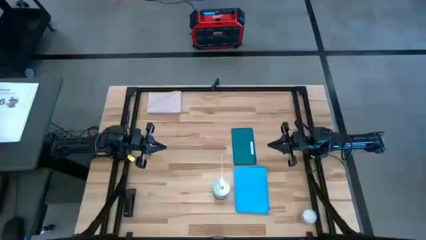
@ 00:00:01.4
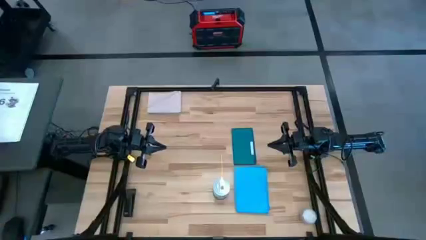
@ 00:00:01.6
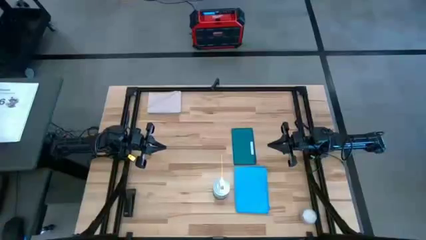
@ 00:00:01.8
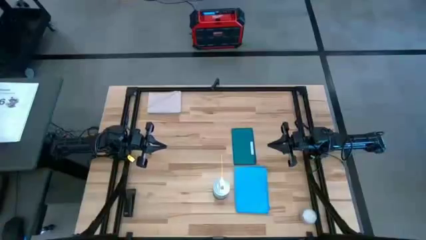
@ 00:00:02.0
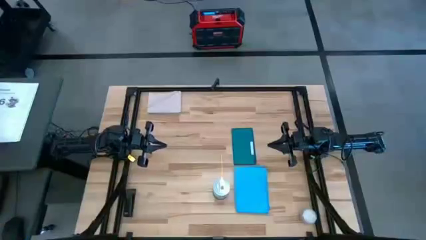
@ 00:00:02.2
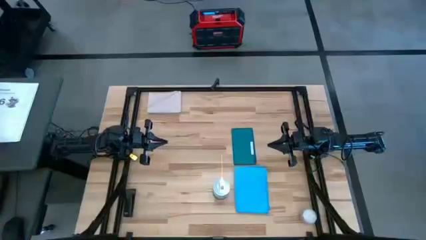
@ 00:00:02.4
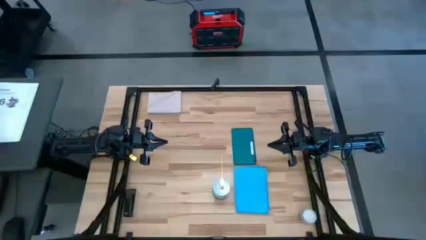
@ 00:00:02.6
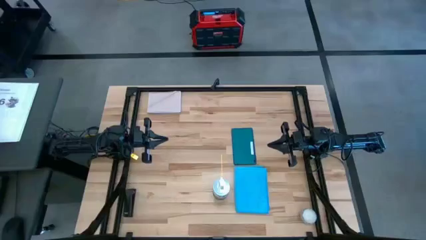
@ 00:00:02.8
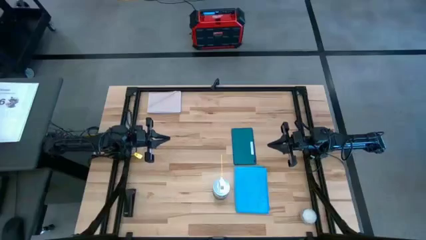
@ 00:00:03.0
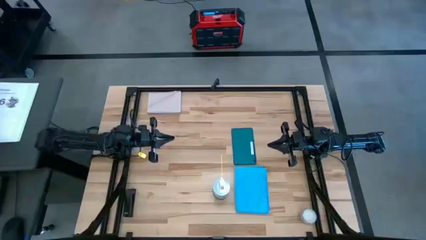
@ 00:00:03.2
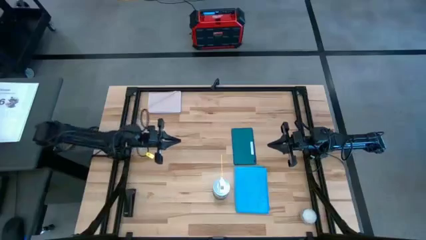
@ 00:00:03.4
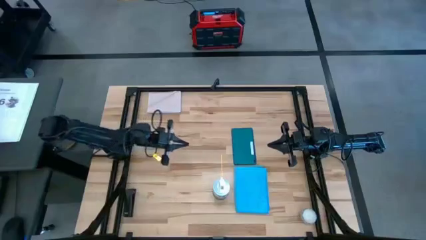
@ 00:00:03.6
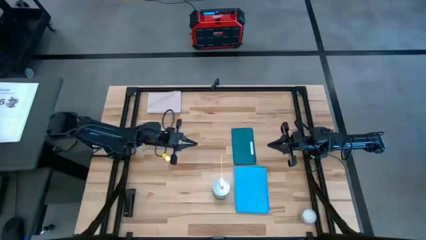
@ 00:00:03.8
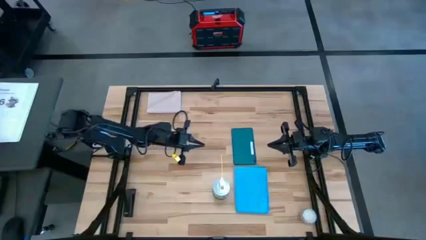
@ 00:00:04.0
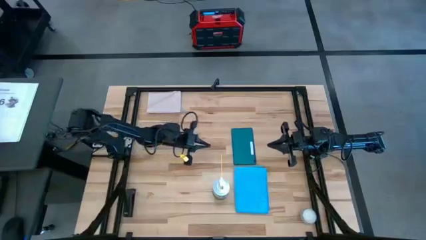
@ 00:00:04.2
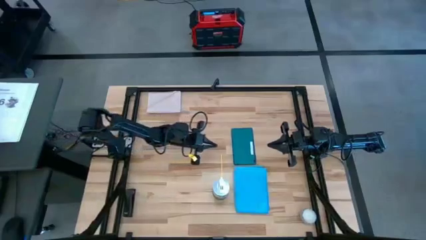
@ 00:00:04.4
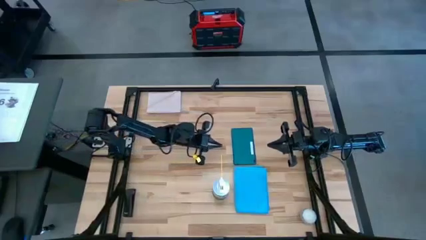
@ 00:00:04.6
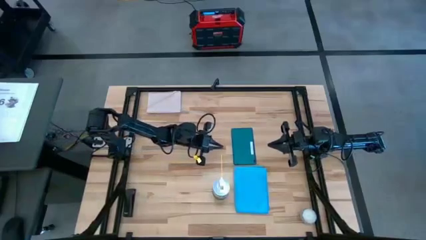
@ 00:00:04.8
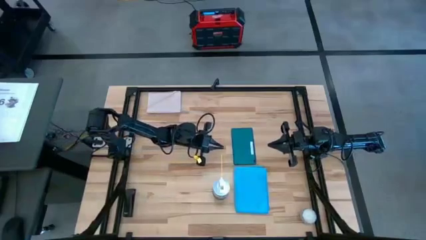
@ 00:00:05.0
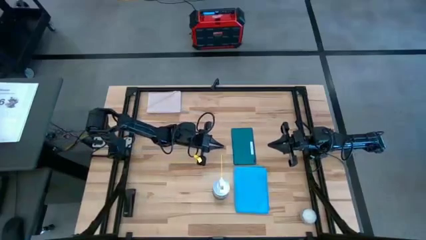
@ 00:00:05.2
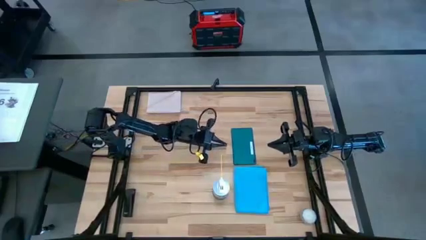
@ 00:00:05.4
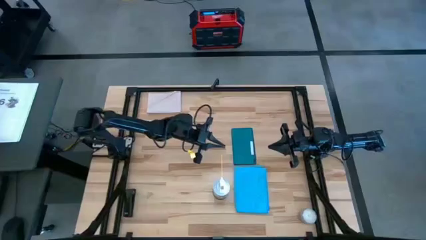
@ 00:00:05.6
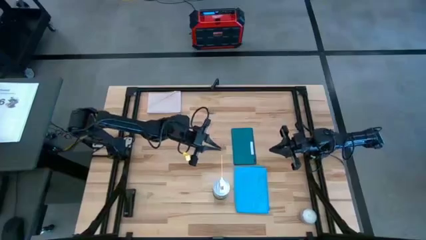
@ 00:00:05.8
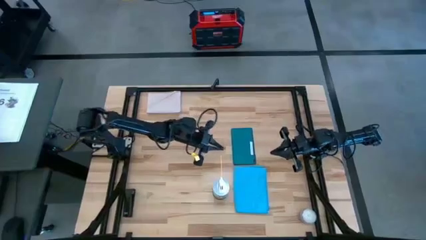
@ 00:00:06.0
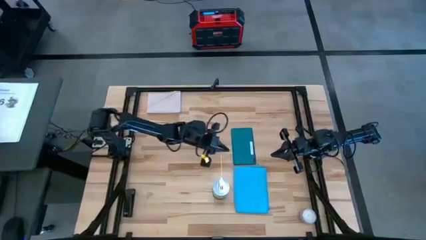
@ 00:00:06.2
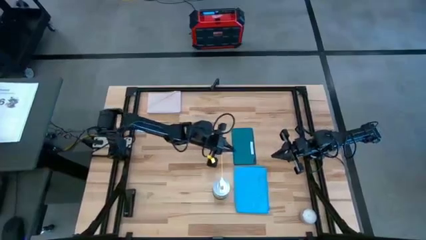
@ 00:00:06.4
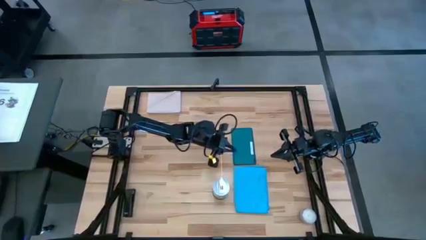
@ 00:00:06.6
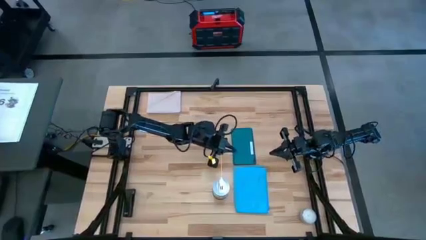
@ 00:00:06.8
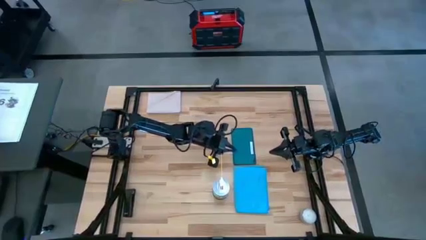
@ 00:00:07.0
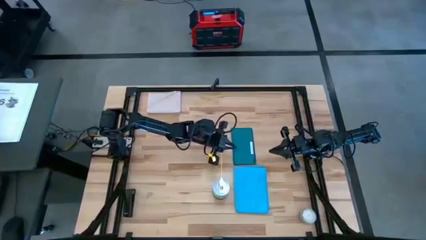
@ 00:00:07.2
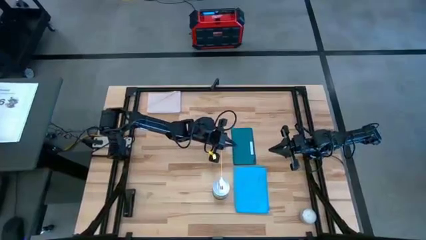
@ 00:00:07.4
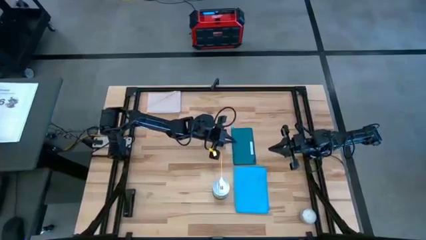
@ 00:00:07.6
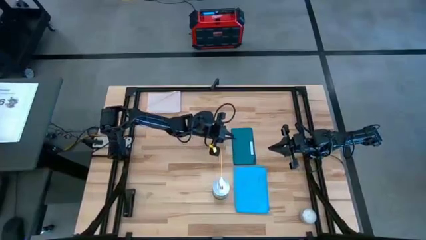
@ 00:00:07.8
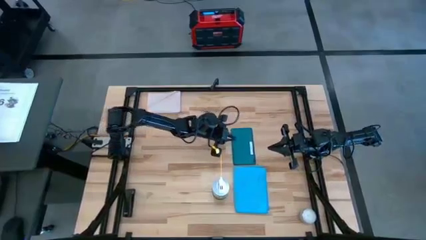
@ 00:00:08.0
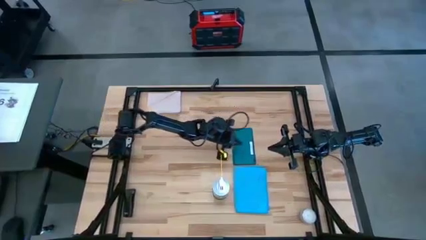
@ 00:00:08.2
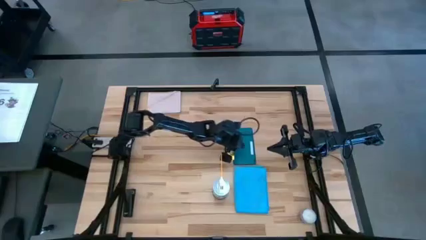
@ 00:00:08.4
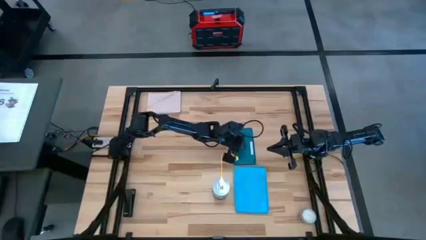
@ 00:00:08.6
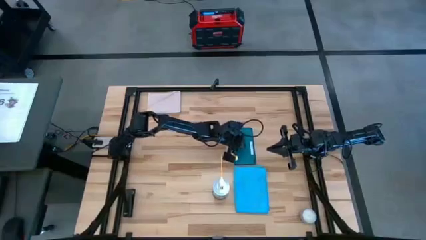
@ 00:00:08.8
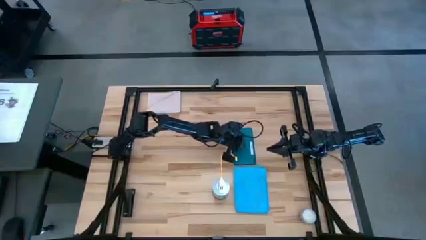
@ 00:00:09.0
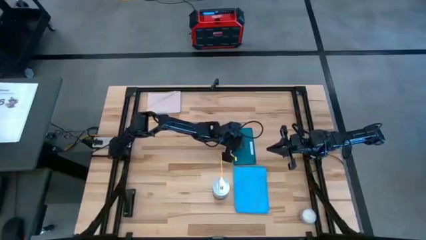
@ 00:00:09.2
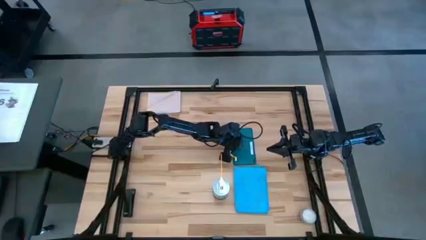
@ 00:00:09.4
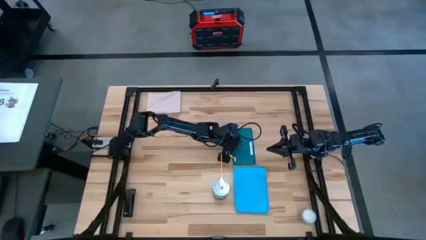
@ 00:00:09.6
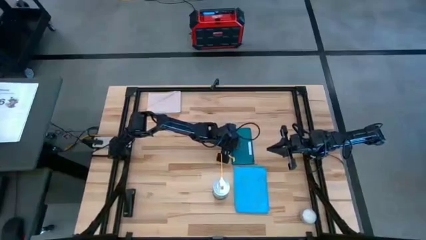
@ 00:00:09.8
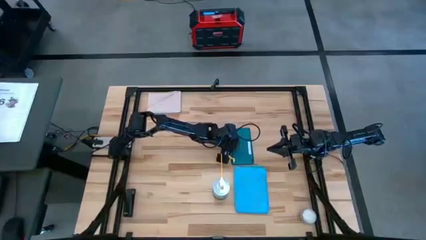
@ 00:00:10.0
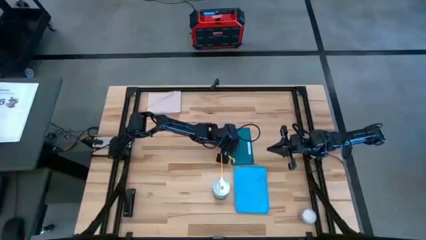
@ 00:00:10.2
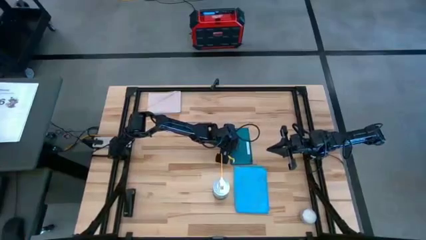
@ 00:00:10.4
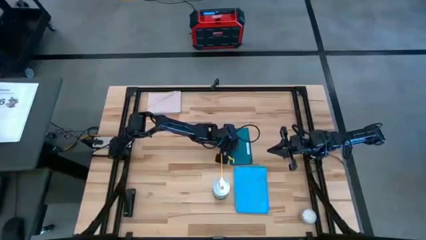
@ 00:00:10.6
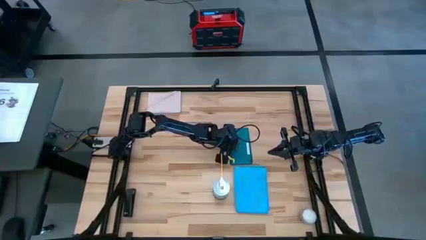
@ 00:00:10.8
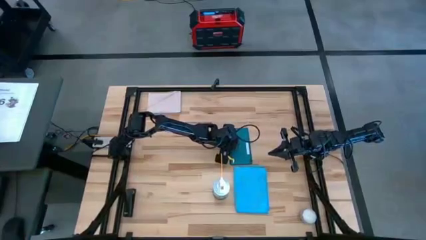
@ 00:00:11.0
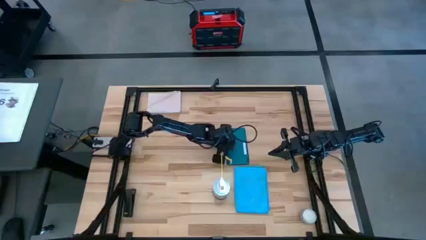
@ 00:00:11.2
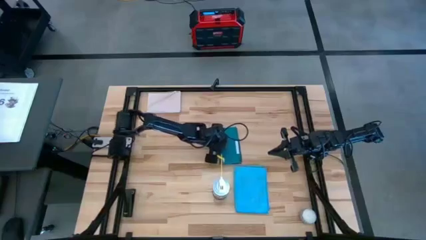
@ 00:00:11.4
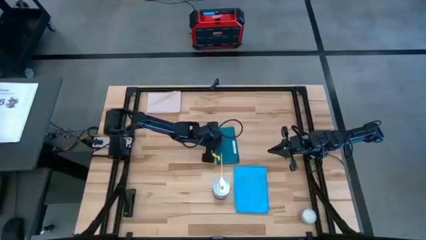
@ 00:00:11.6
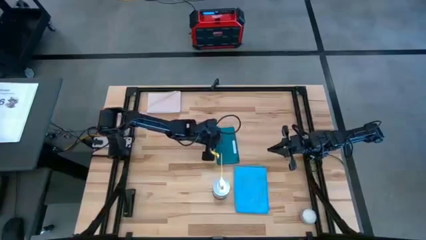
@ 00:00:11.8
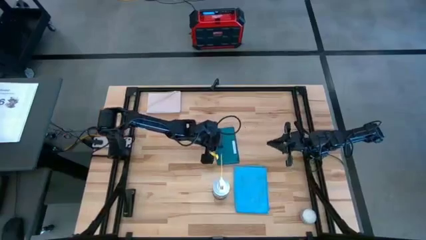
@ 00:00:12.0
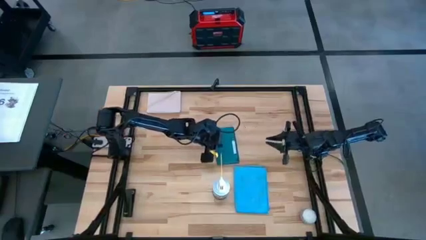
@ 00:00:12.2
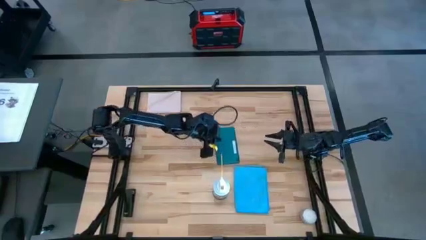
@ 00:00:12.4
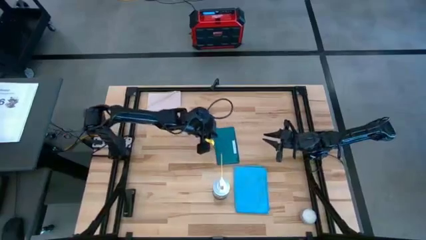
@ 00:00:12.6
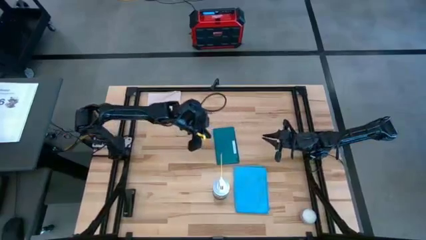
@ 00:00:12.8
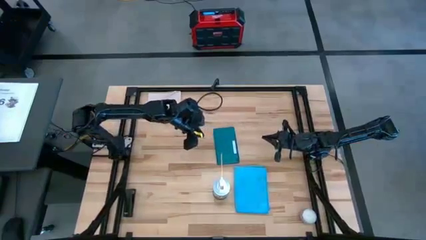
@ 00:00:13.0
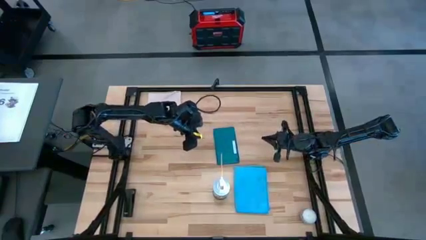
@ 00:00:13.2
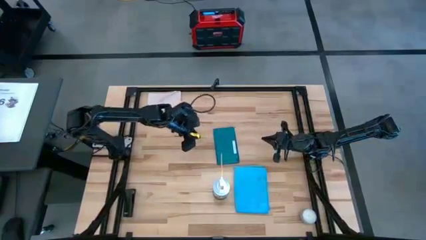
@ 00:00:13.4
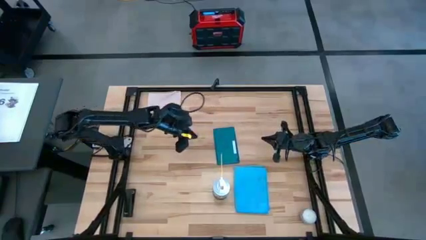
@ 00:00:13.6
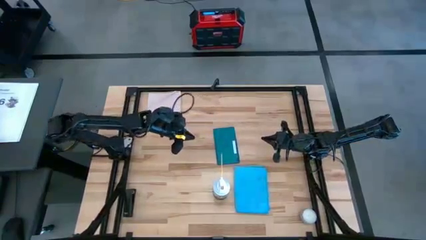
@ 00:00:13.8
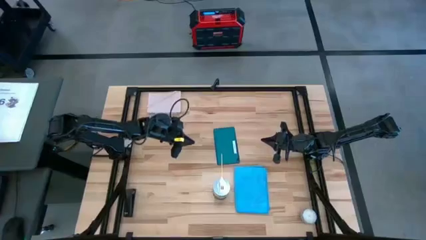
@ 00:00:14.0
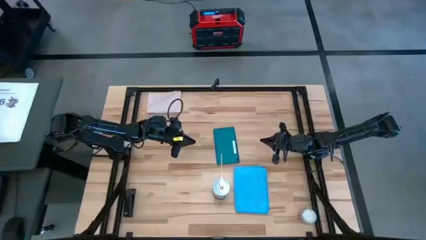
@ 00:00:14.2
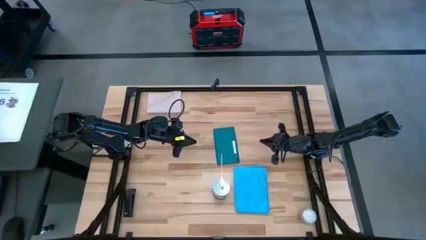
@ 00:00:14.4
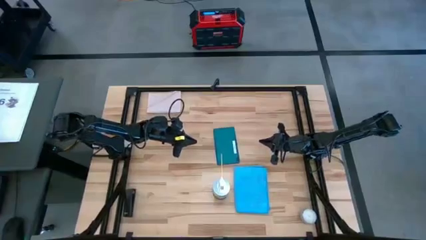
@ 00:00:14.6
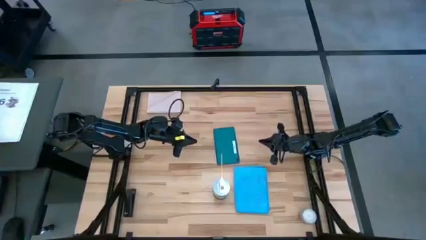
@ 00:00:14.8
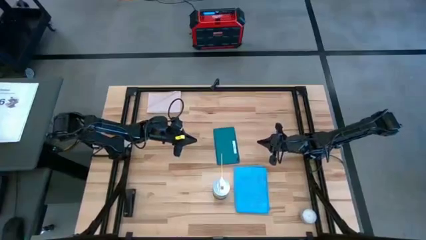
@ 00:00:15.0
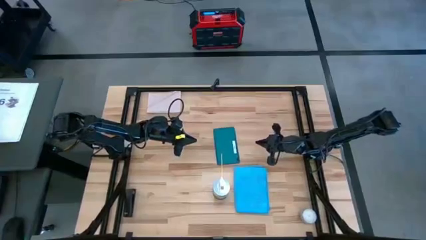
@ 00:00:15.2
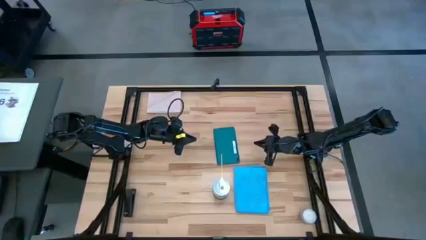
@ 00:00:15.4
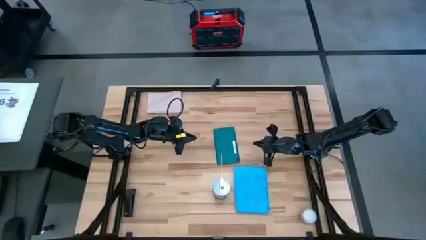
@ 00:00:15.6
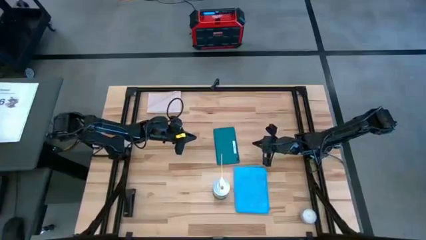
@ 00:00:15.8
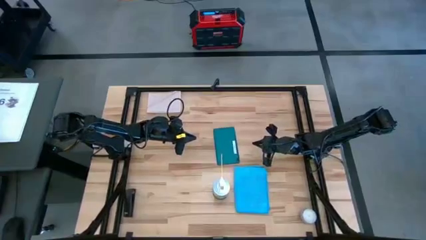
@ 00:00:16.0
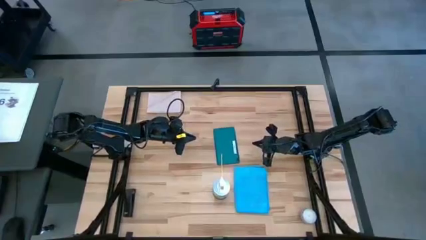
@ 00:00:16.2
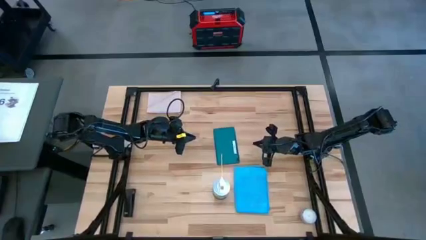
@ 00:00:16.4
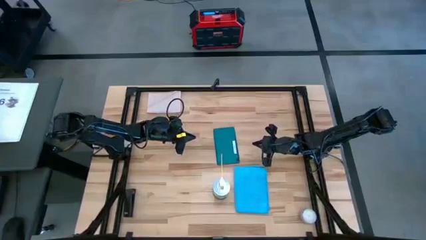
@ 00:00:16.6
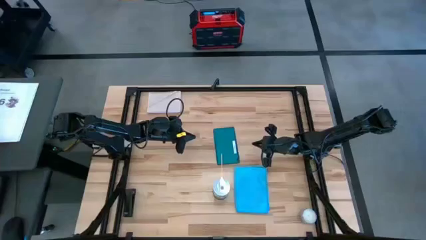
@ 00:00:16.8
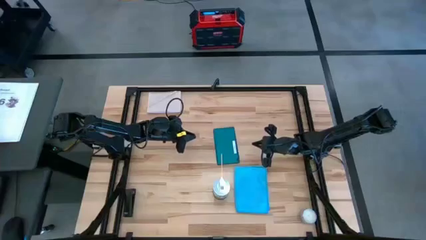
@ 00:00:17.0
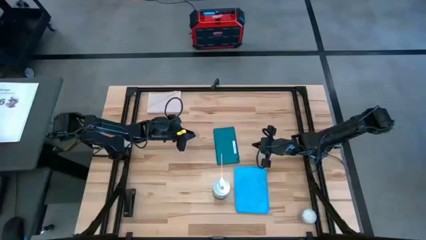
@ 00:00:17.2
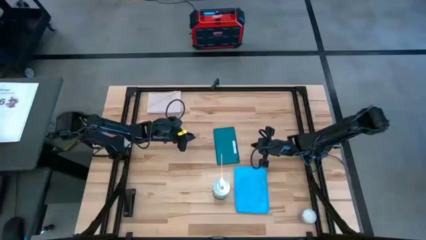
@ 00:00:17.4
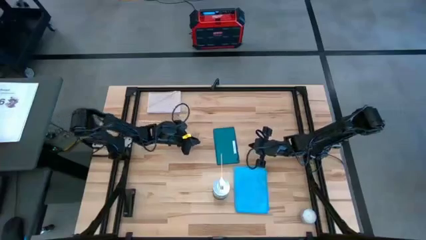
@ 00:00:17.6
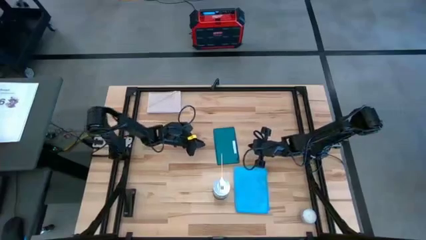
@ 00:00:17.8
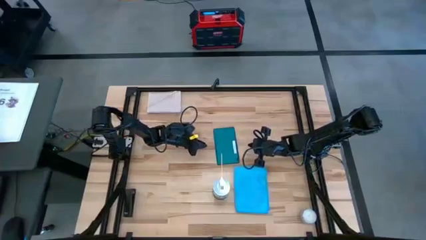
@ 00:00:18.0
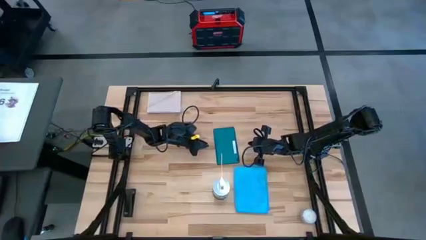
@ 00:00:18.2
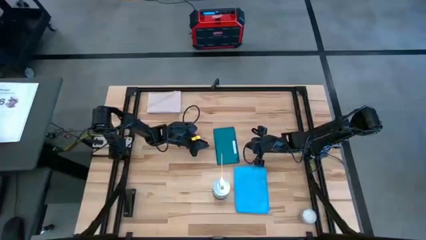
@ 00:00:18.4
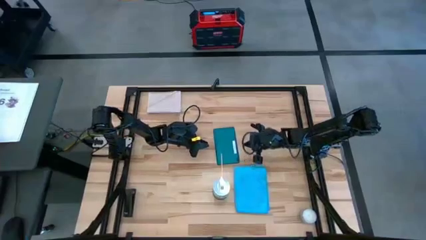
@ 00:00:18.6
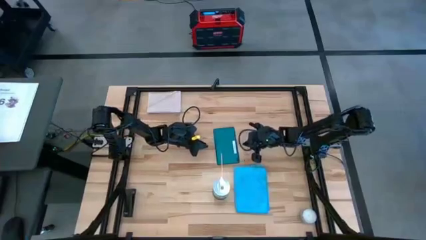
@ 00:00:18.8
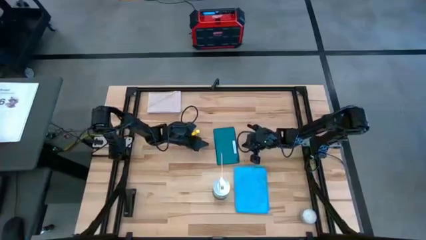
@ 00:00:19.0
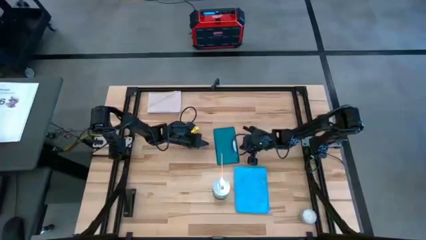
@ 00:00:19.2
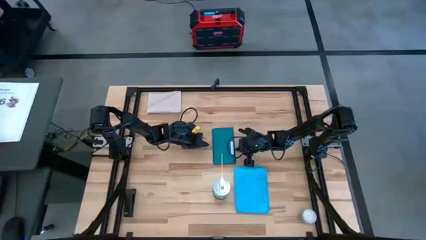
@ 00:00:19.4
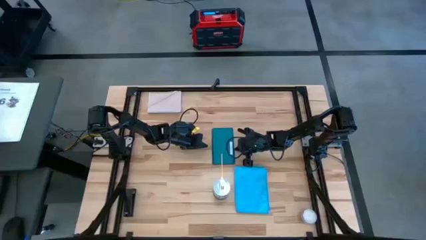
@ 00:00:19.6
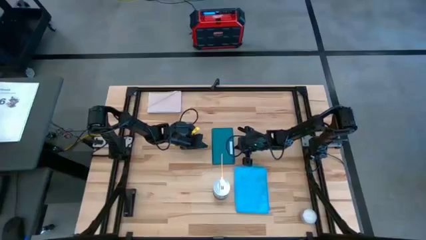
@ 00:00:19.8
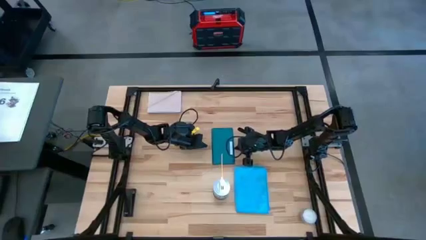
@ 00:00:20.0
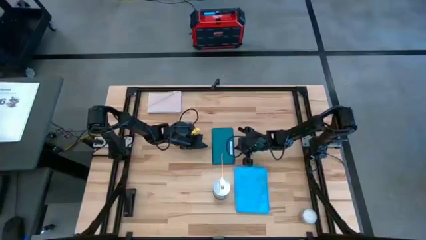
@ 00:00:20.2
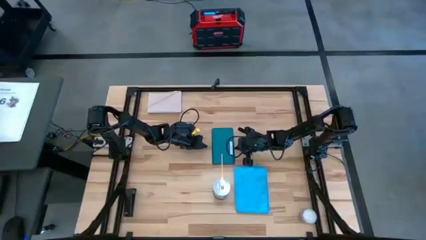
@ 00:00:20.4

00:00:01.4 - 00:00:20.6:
Task: Apply microfiber cloth
Spray the back of the green tablet using the white spray bottle
